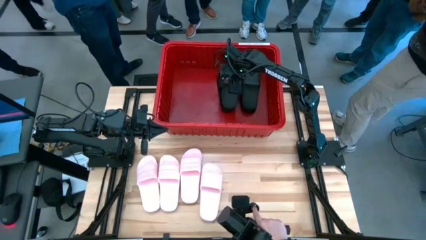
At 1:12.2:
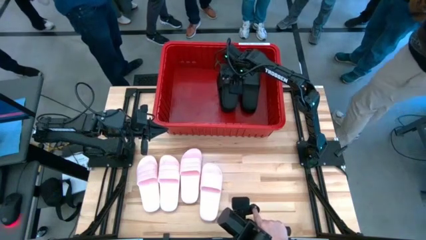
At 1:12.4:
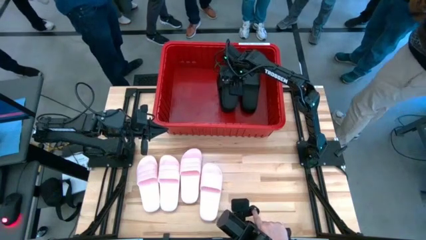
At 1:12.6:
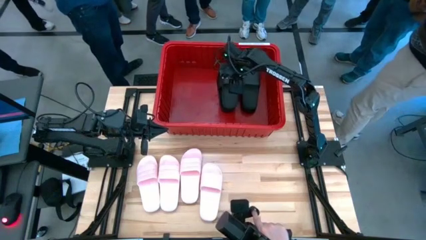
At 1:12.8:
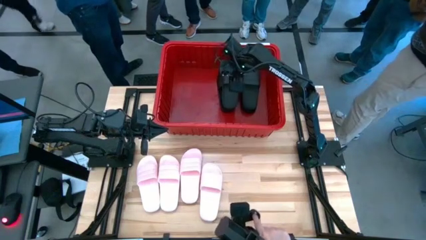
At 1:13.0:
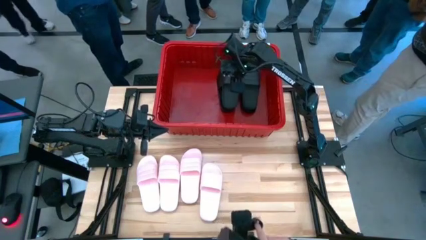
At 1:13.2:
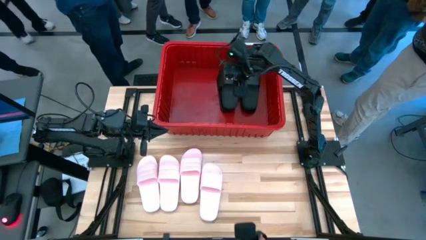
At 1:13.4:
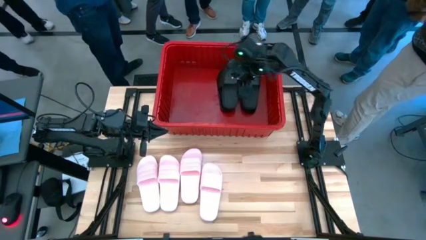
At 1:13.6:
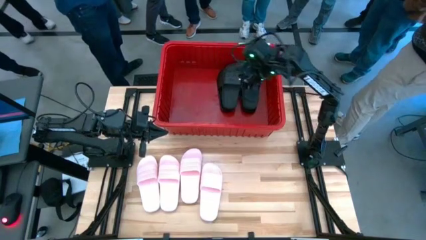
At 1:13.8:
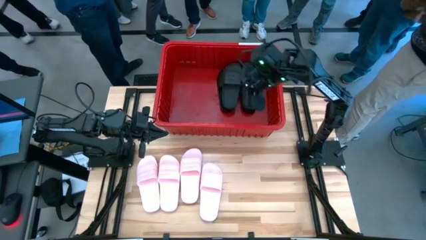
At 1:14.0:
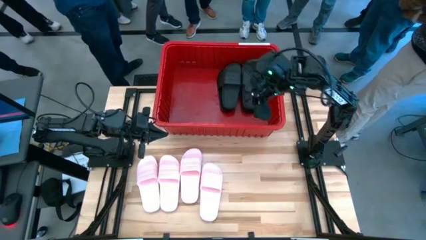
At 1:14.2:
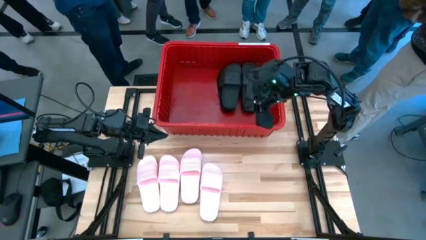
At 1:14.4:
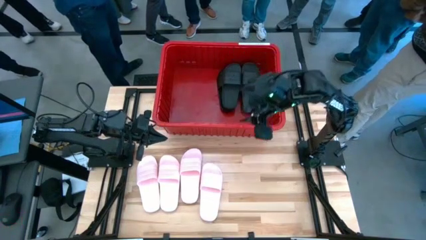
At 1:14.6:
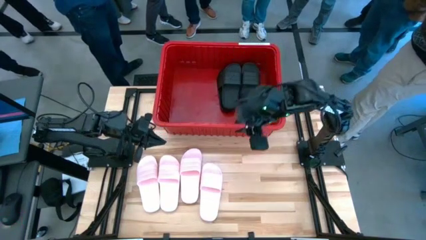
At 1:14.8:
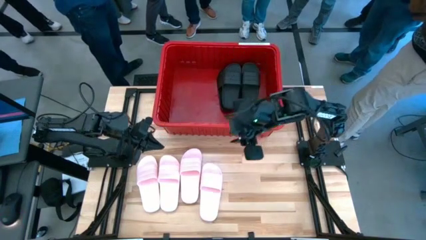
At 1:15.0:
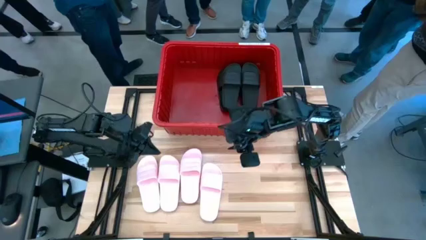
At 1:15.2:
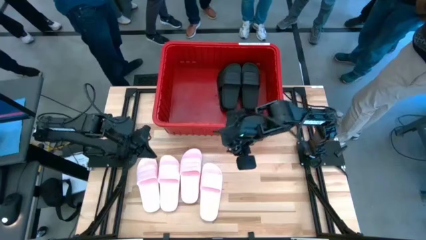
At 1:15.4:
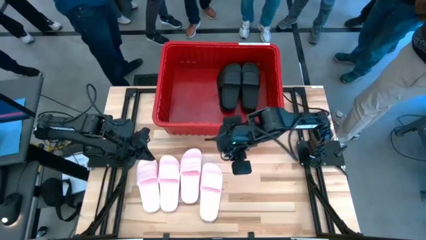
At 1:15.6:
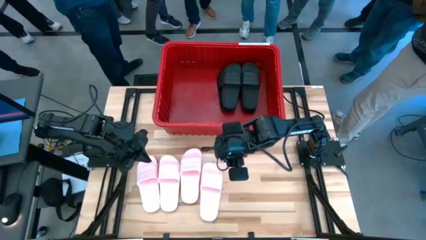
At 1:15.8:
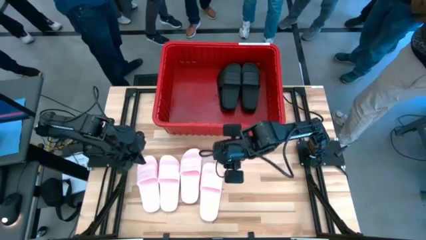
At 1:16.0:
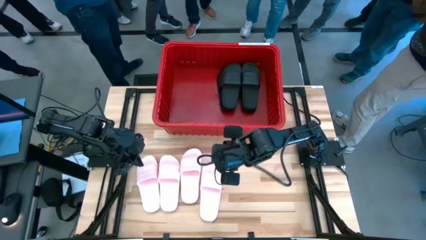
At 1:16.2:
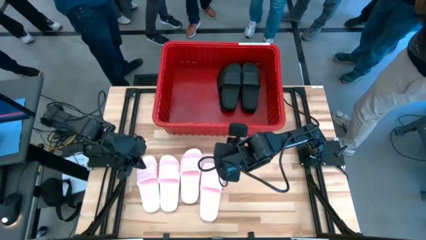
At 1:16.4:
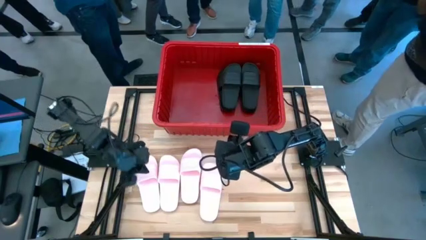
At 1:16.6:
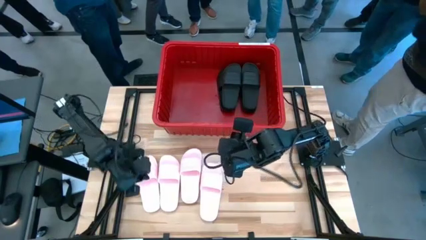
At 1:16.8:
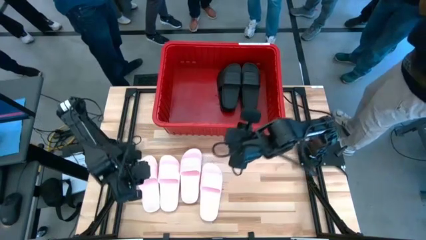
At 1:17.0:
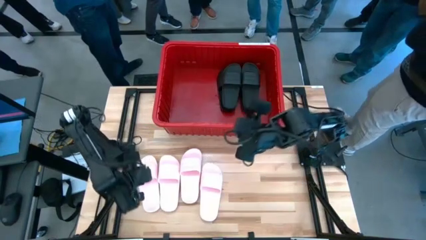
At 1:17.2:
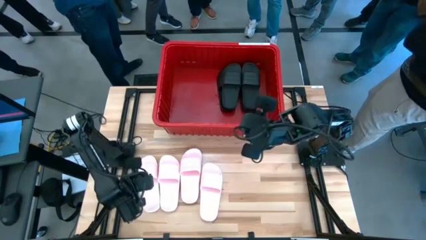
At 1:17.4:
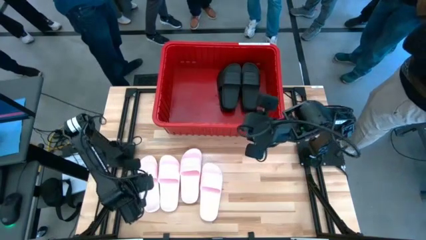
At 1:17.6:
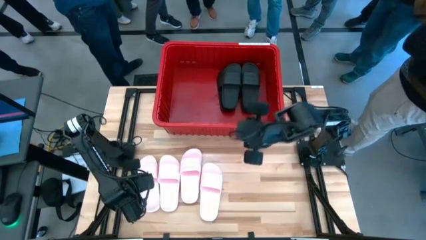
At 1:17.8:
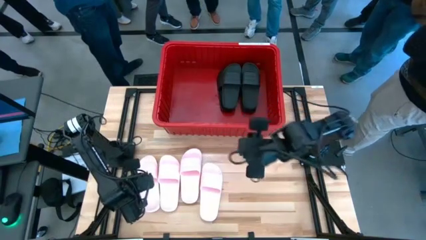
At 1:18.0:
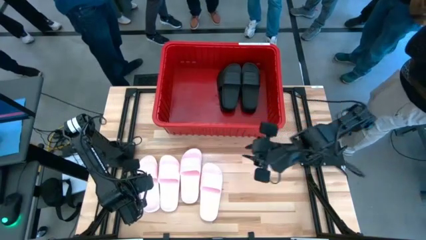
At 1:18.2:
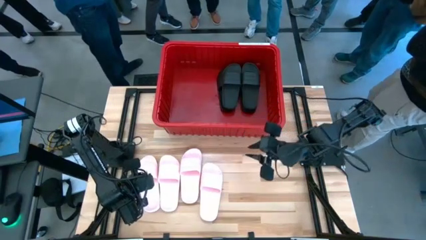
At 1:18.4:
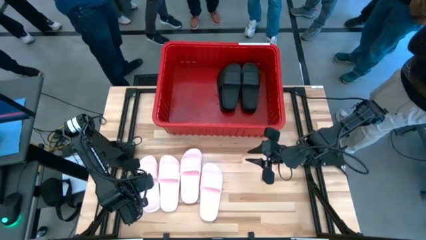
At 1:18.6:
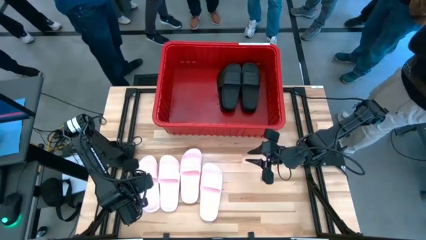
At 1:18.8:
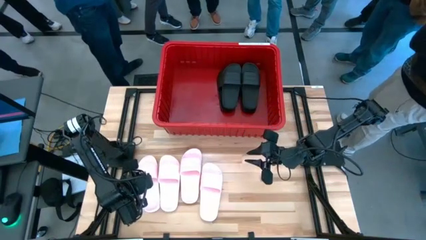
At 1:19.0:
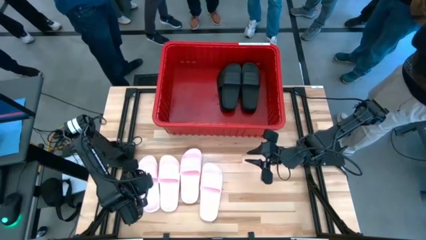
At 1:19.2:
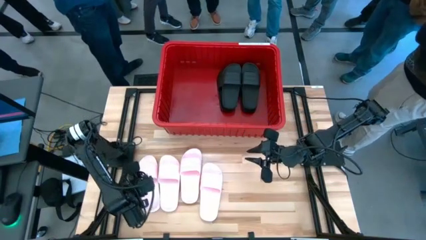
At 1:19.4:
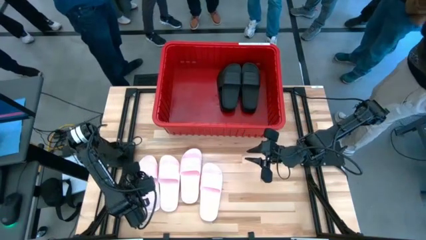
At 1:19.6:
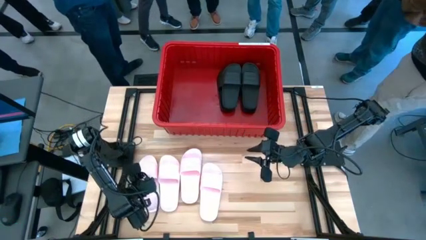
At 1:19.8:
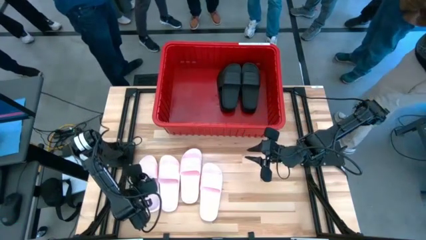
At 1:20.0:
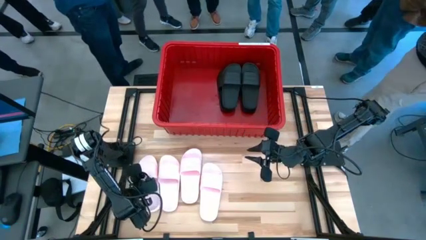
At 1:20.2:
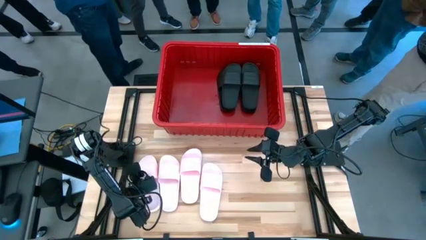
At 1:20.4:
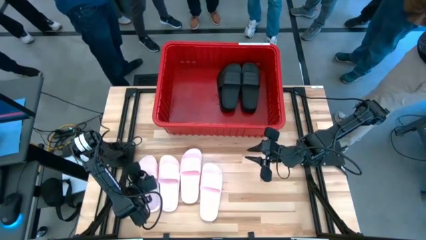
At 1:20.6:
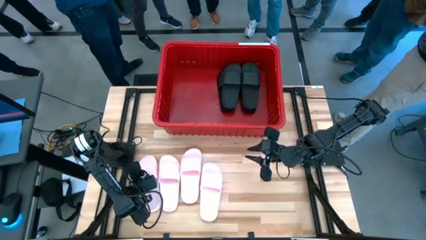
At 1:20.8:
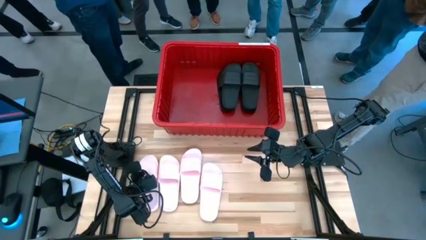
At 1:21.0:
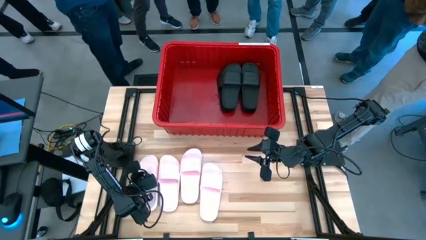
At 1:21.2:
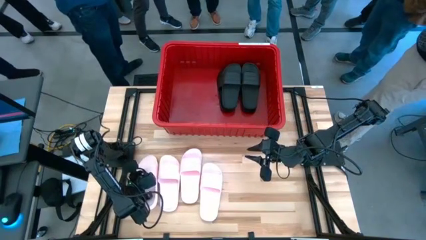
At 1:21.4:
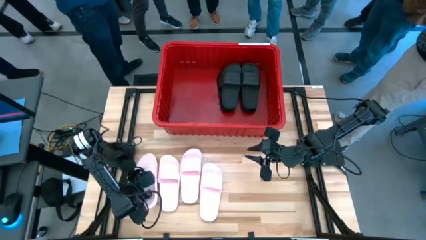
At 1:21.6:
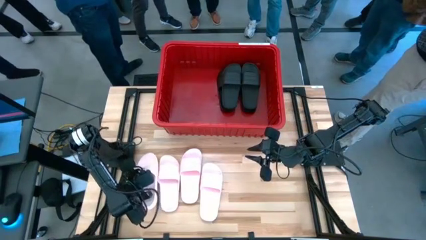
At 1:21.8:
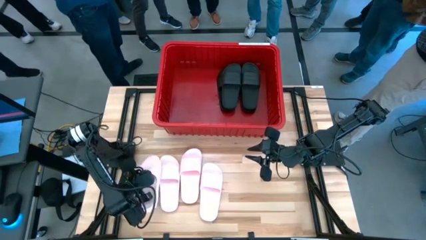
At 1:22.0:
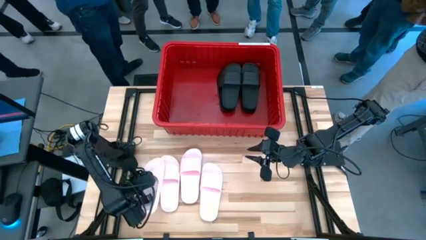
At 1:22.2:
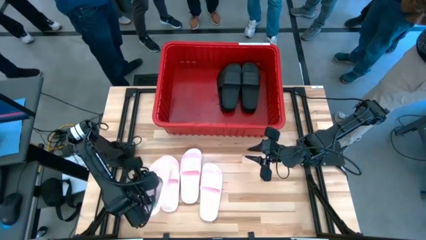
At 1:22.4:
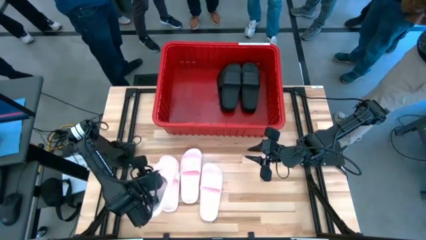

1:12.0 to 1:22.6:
Task: Pick and place slides into bin
Put the pink slide into the red container

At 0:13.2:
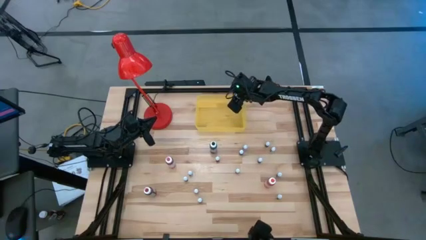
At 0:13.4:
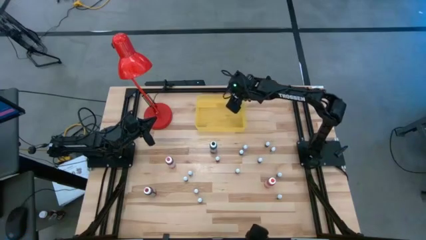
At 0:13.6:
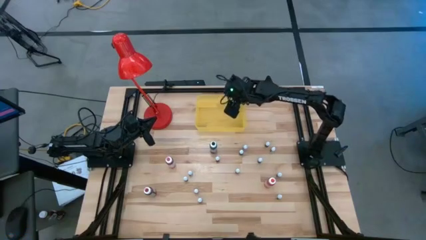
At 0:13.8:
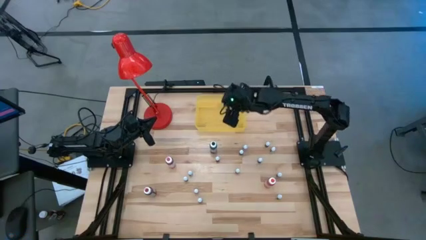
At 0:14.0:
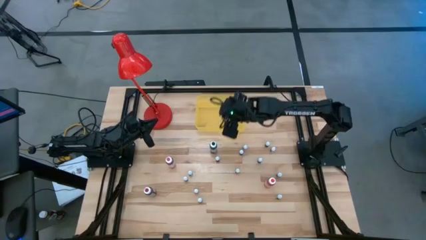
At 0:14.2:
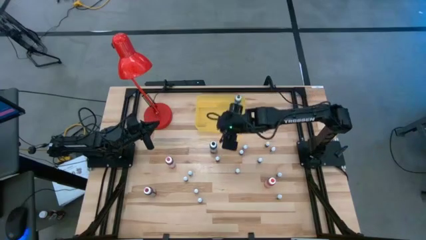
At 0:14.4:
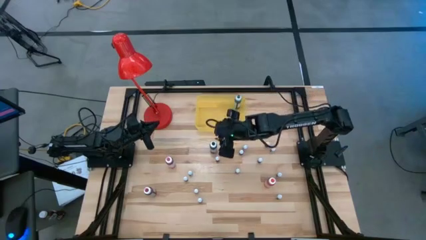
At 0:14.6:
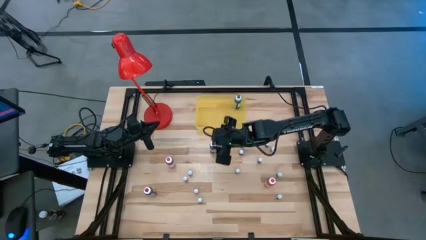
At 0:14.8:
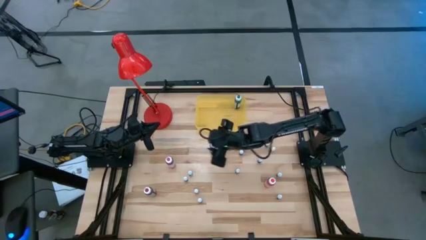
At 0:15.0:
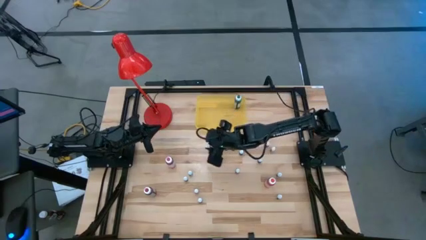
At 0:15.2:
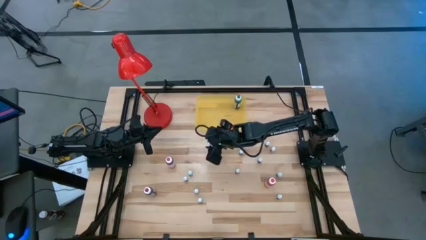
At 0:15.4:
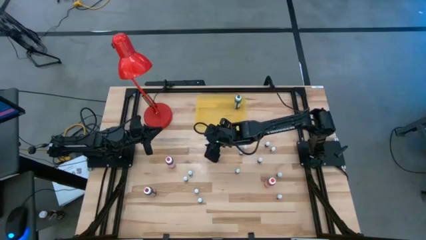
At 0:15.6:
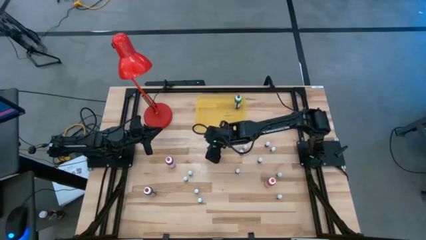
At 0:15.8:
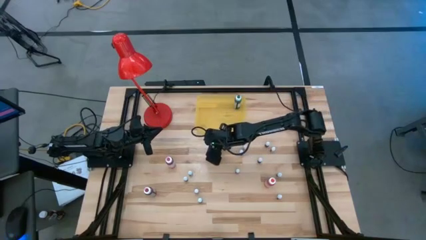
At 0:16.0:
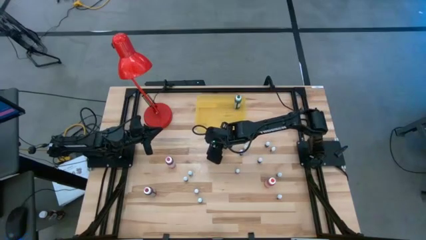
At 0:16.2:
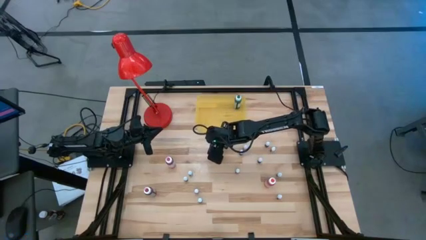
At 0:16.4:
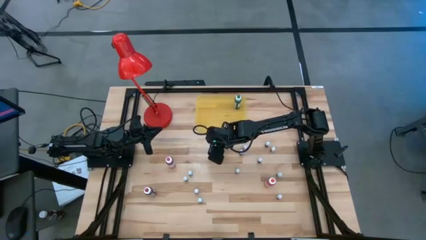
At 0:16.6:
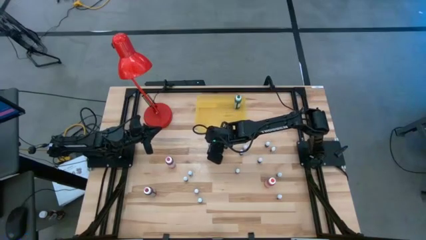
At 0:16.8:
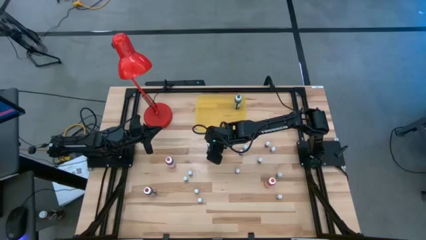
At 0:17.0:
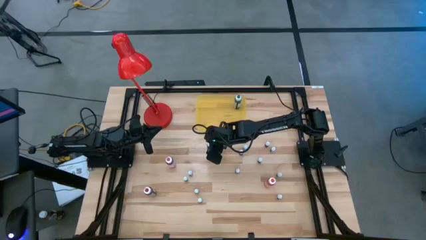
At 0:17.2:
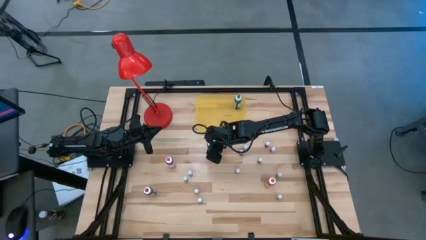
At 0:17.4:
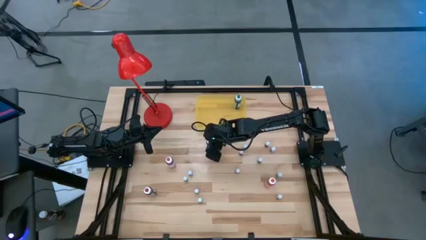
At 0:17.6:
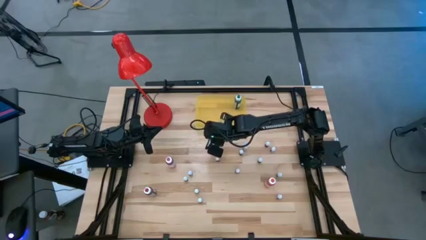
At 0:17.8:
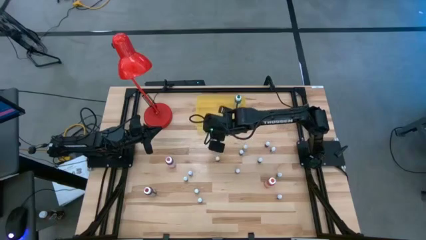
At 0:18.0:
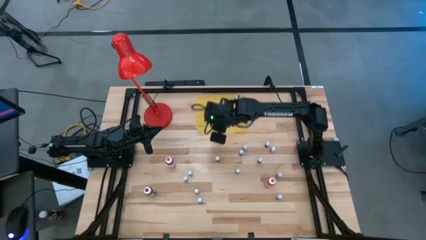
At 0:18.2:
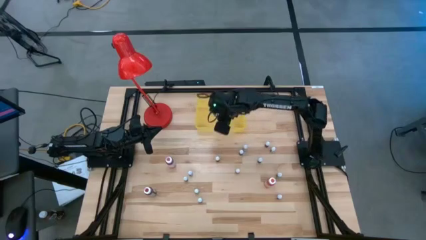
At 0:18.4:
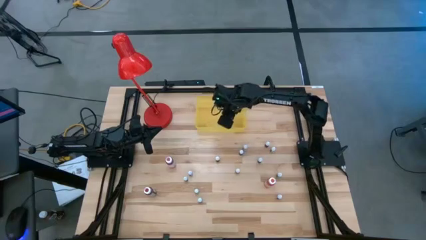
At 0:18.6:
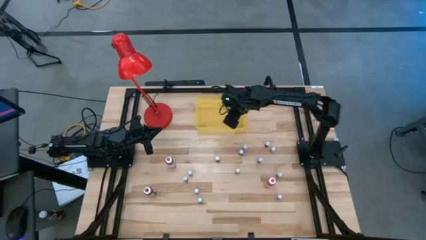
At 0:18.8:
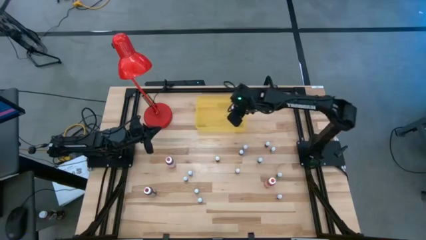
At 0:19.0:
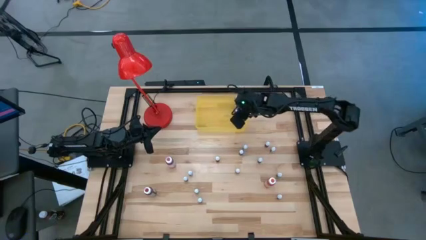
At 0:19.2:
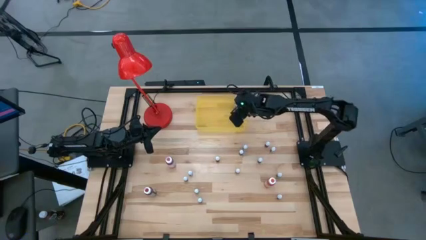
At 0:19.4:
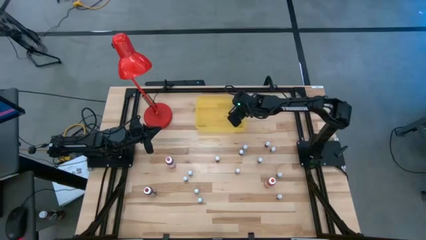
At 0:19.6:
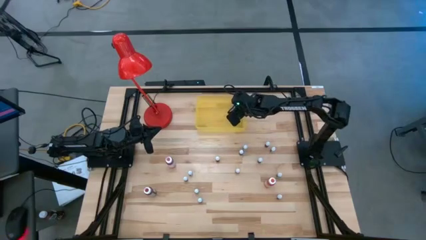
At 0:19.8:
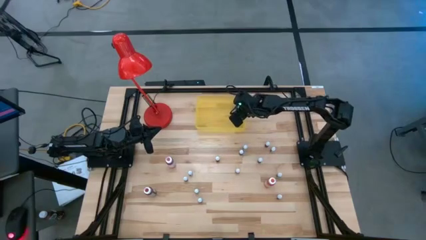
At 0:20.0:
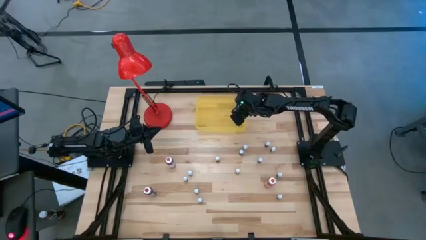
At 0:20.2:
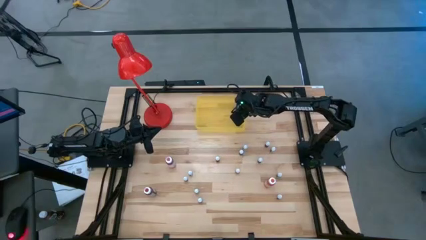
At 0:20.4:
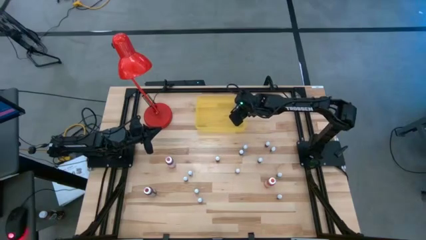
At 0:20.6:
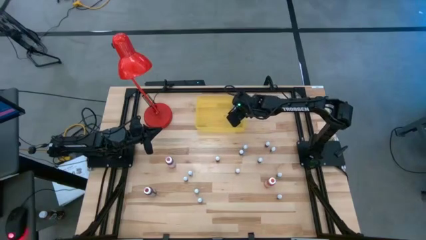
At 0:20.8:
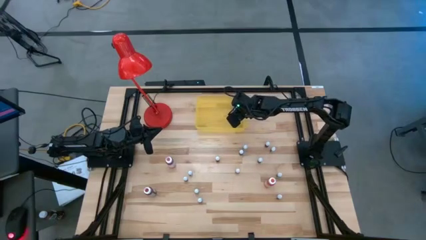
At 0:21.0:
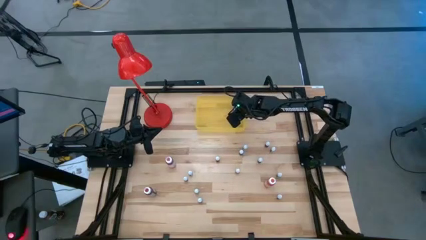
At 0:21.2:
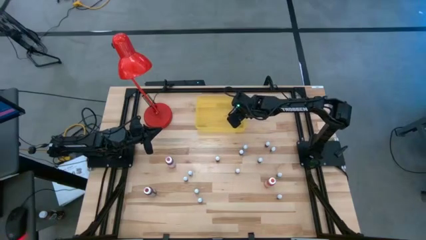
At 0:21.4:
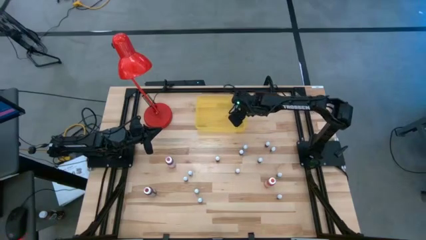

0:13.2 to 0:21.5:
Task: Pick & Place food coloring
Put the large black food coloring bottle into the yellow bin
